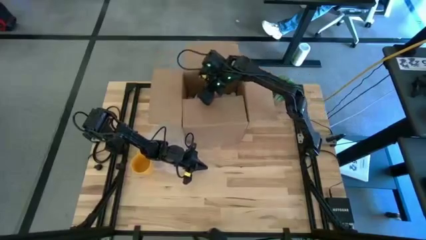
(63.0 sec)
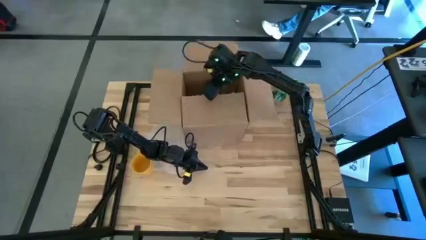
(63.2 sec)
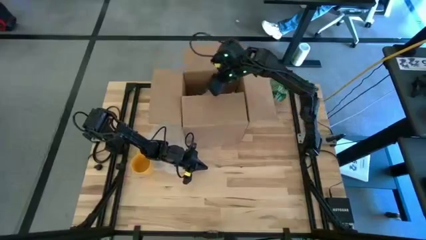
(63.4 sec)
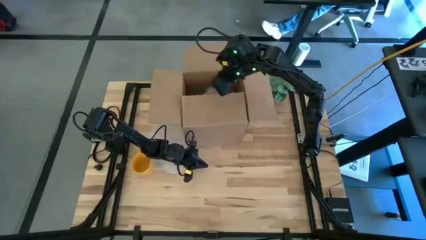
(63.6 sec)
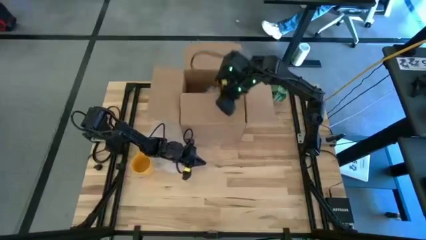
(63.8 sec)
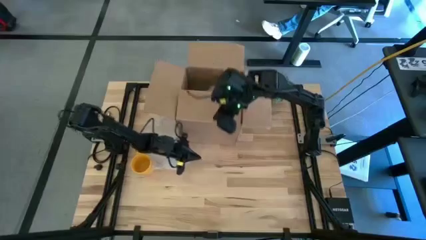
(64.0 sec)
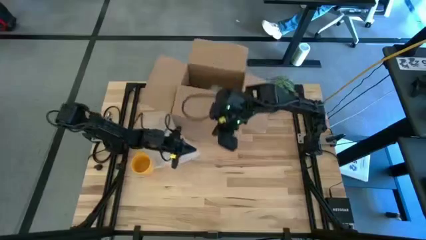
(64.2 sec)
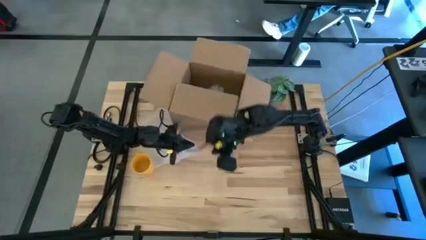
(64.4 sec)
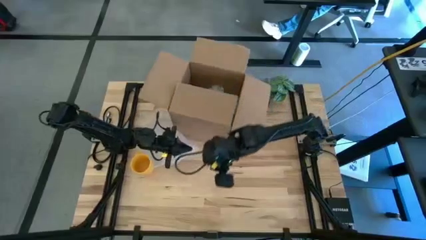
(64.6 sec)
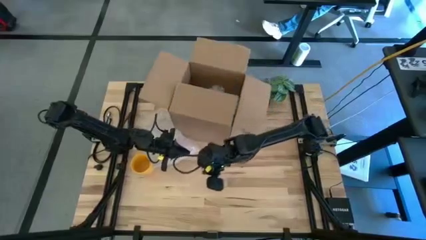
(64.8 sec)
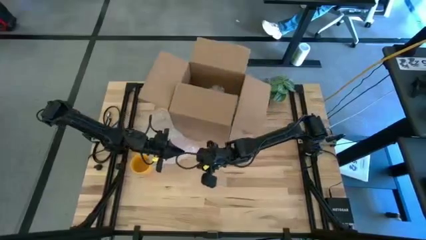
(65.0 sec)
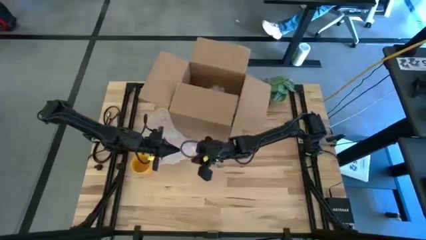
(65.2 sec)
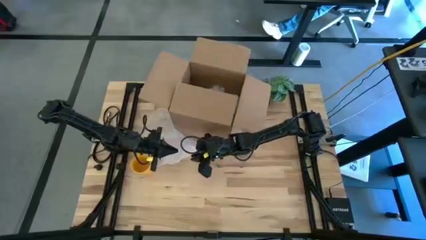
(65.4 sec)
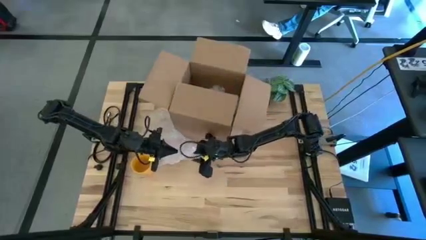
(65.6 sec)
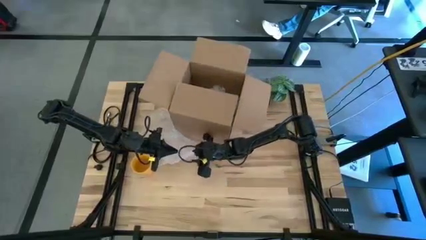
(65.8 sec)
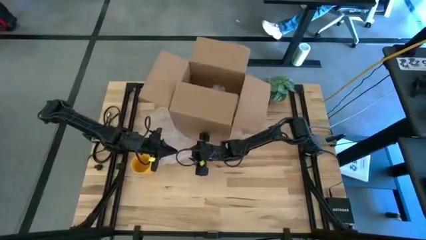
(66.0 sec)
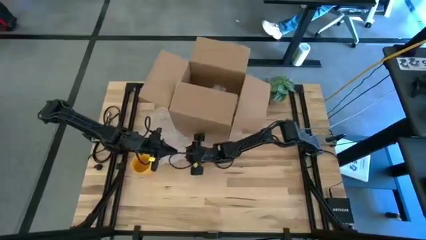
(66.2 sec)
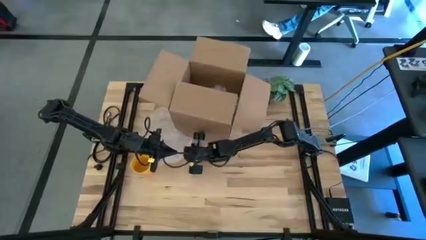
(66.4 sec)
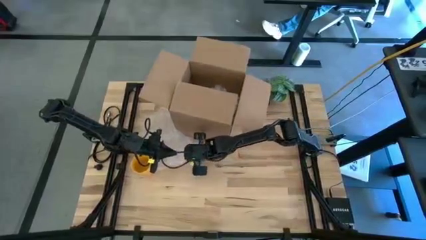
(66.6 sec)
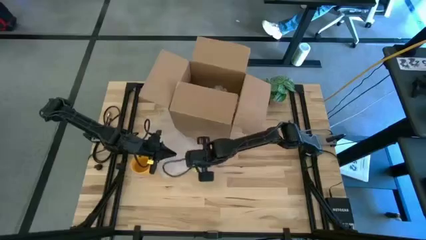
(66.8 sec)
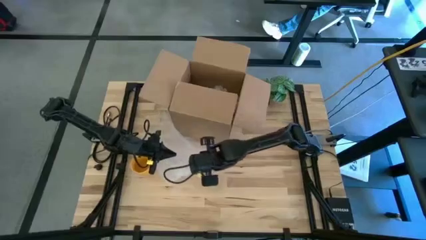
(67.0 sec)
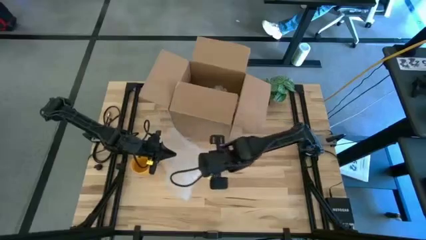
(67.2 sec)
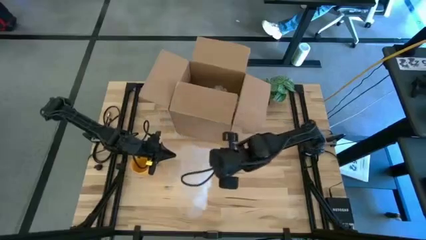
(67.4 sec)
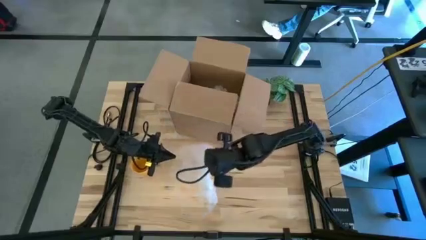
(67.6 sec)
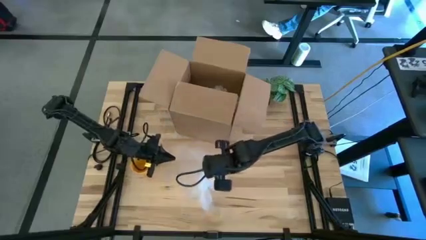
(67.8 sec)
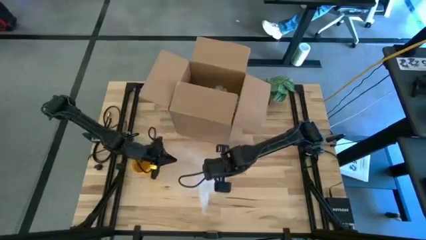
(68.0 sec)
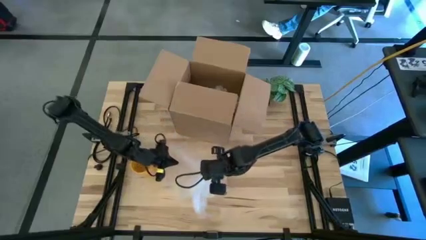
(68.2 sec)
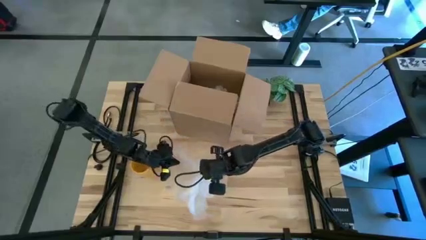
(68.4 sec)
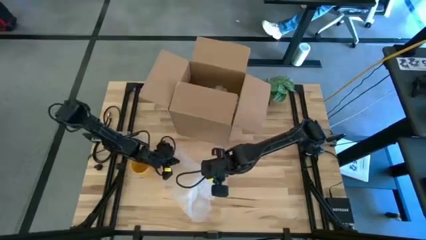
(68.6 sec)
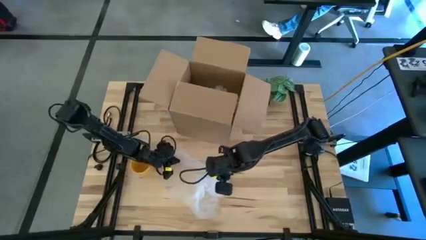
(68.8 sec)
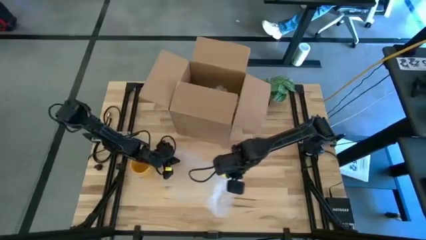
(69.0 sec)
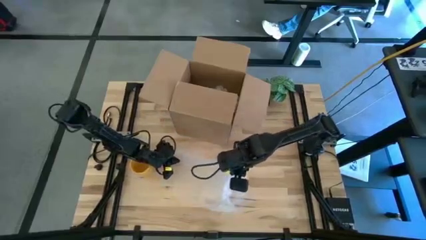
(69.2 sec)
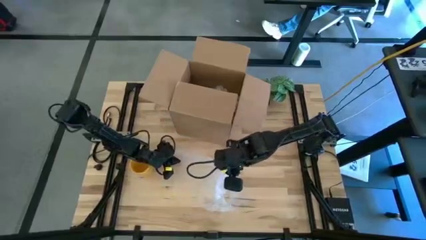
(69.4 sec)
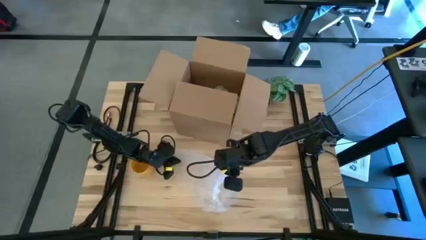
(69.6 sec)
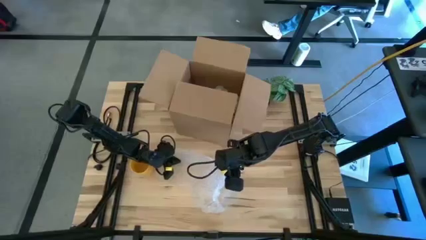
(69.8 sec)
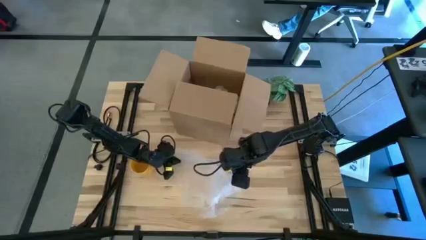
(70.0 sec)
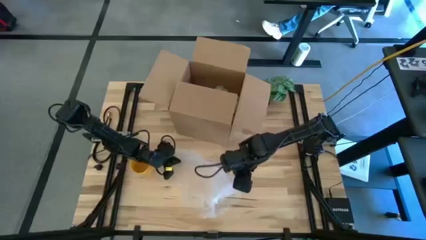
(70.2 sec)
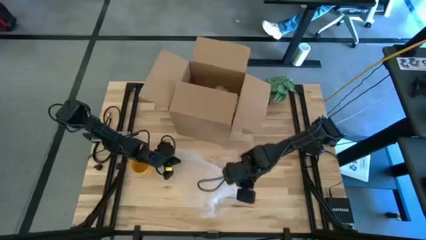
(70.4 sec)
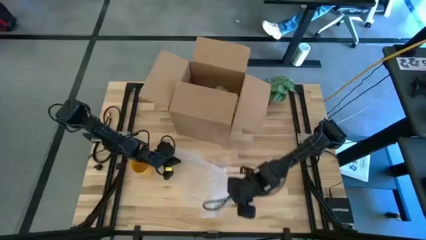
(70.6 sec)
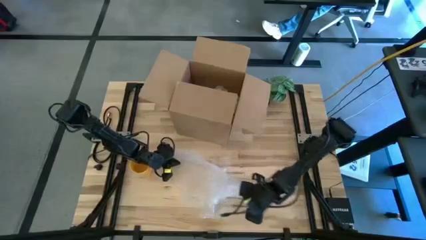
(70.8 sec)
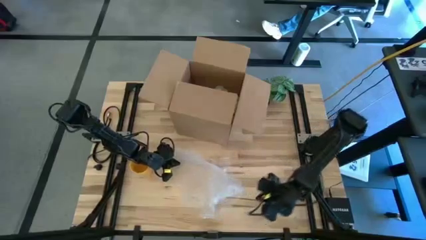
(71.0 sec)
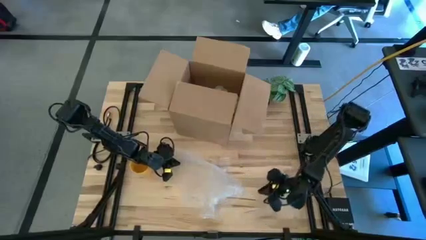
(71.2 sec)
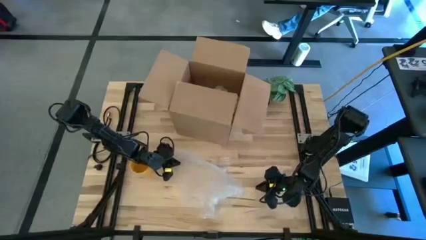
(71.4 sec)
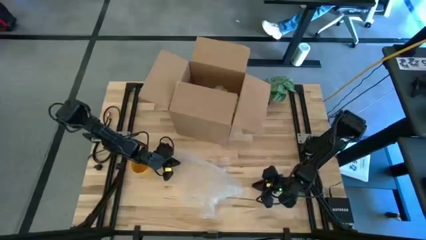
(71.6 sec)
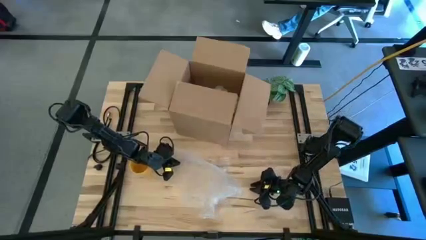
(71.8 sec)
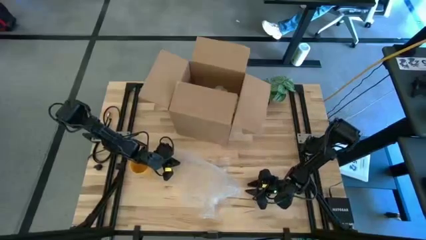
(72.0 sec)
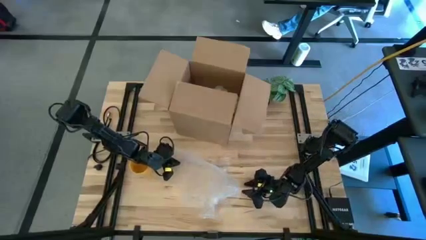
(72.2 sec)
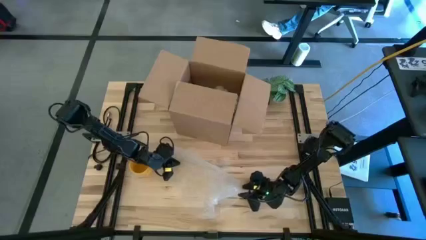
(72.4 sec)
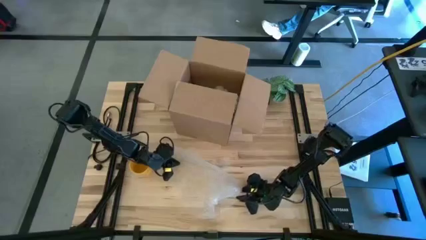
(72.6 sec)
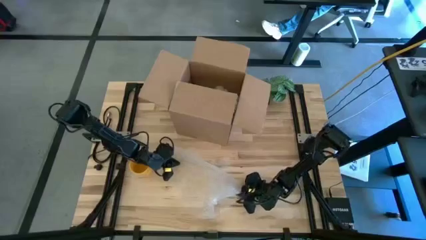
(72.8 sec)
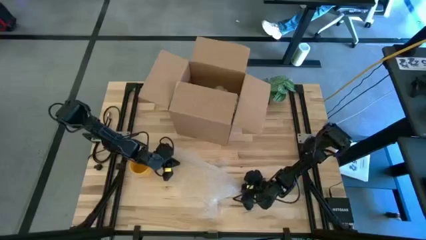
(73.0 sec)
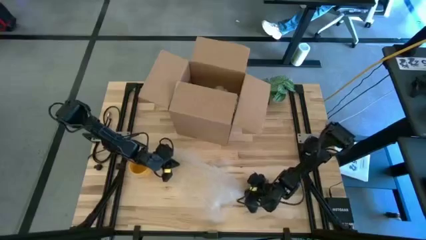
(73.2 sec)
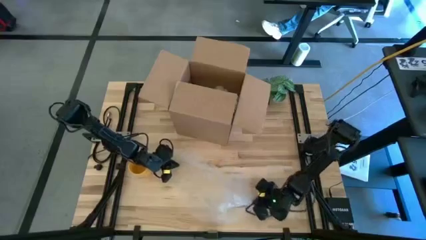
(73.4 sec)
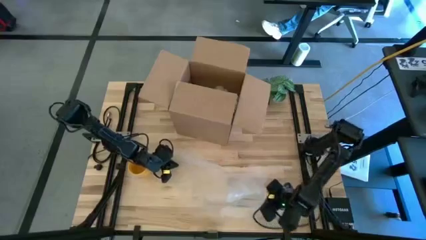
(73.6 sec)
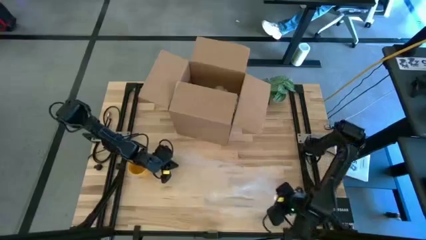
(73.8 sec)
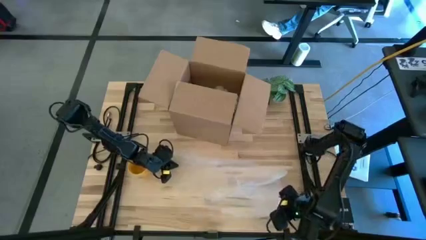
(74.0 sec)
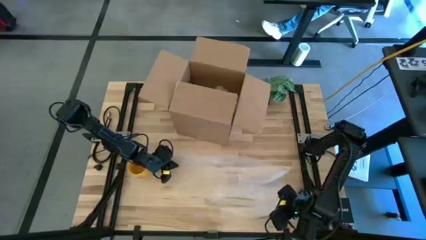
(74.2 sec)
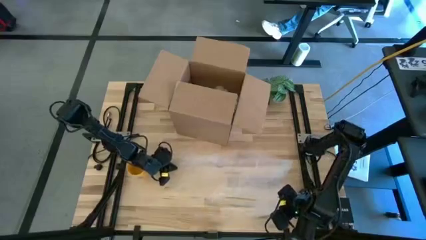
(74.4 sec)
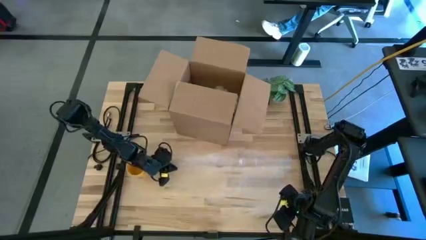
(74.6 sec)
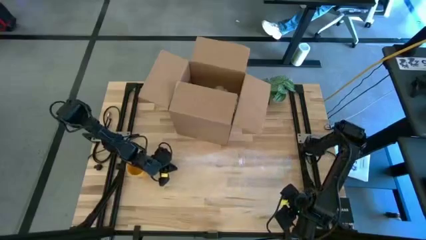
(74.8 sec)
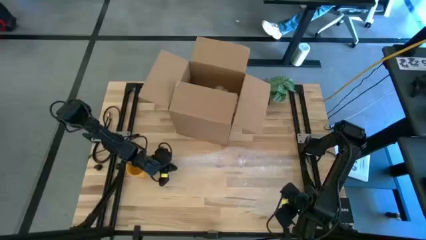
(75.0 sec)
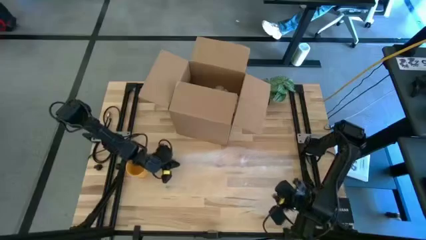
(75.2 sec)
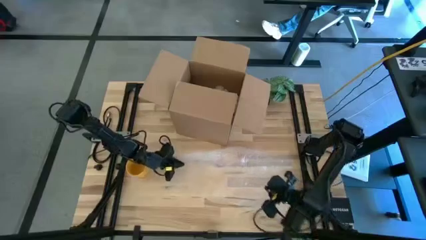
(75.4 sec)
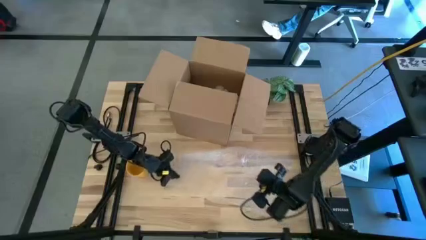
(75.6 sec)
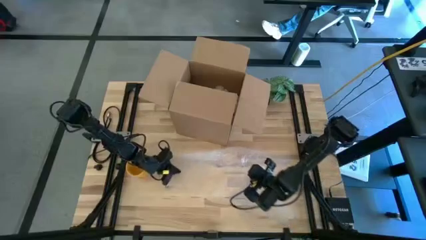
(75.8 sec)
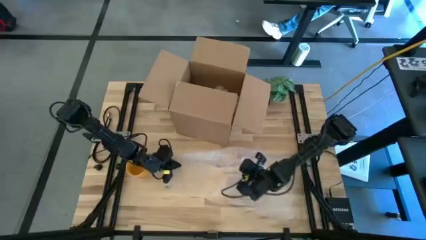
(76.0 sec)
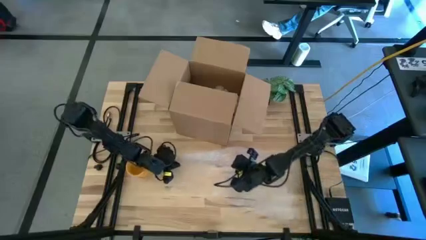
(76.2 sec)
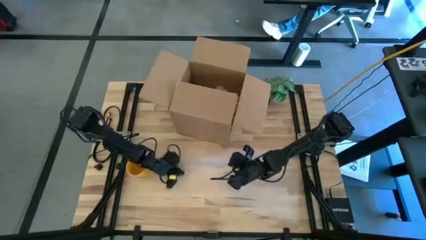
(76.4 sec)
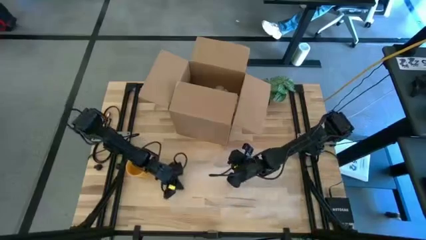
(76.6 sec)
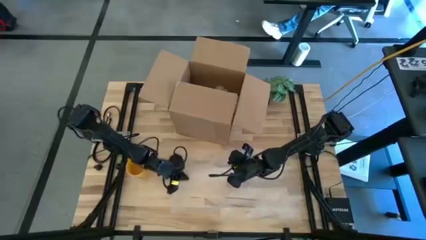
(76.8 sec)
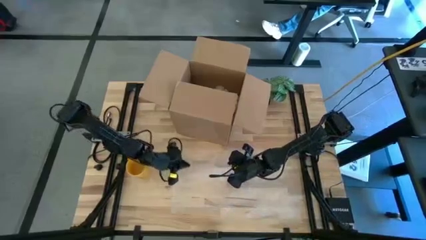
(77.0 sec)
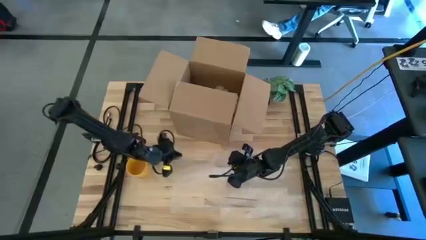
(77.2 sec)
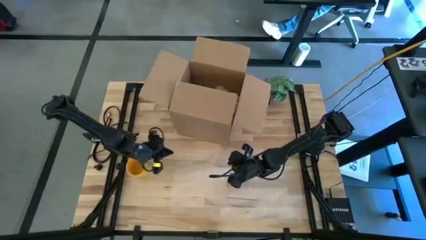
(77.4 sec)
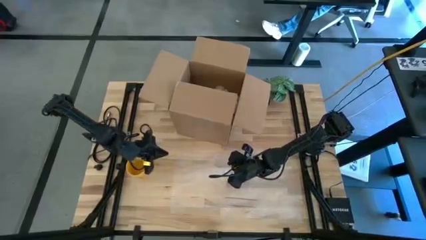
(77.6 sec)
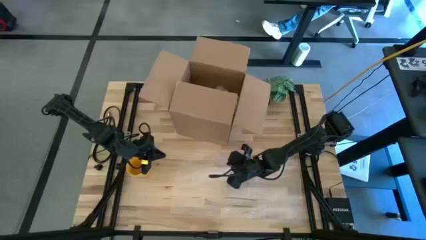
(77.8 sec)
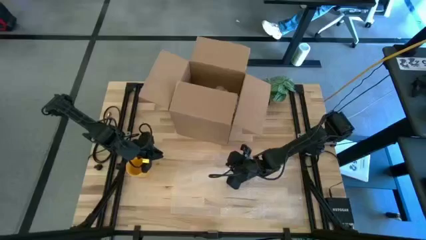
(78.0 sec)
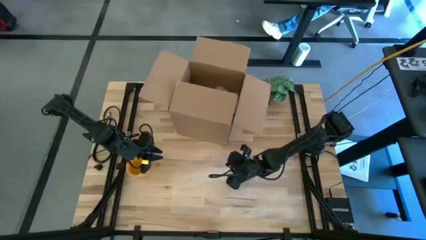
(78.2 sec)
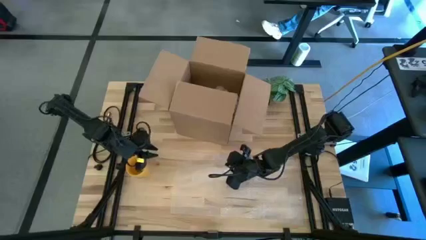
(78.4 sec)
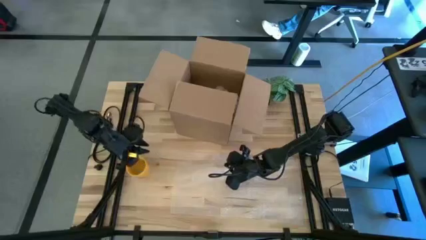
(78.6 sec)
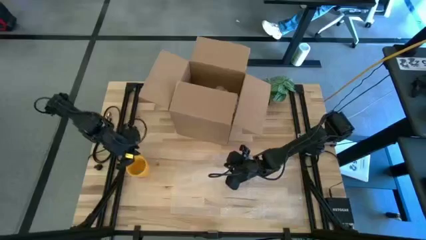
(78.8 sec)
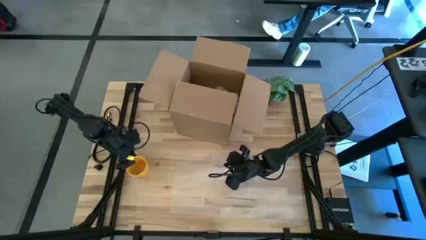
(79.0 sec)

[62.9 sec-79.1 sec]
Task: wrap mug
Wrap the yellow mug with the bubble wrap
